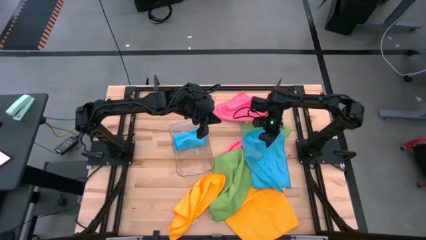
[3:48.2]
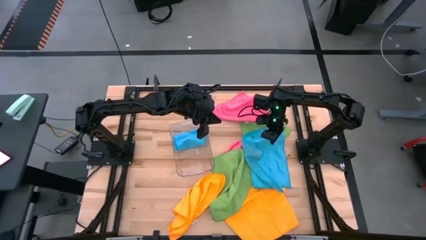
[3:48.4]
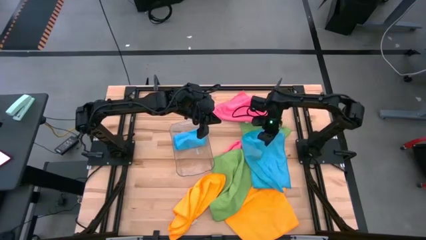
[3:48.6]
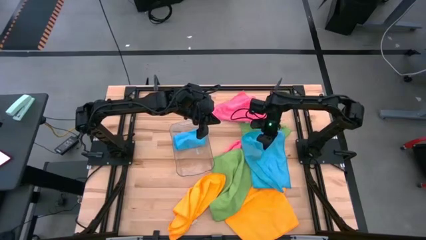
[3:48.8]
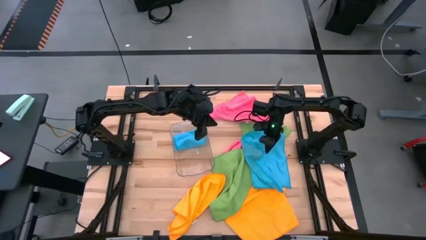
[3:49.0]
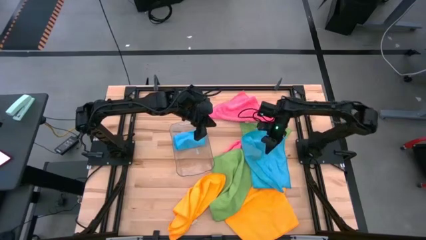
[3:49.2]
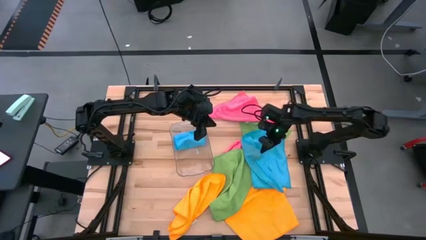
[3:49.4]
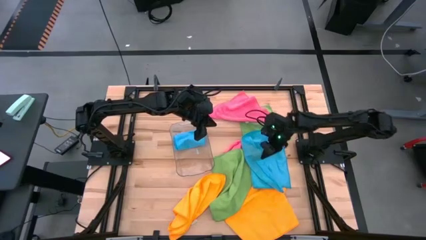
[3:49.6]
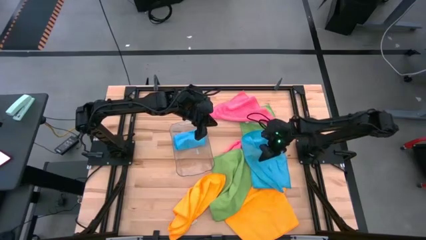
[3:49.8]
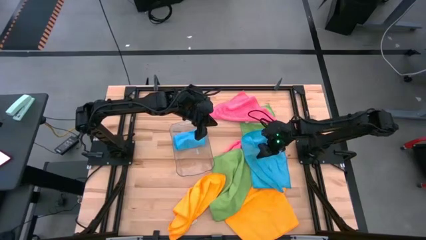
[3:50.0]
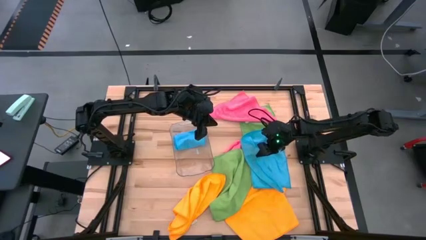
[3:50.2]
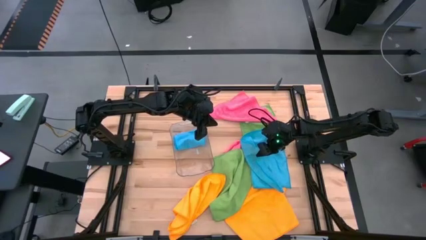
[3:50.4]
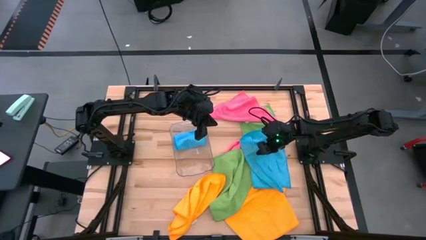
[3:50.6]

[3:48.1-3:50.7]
Task: Fold microfiber towels
Fold the blue towel

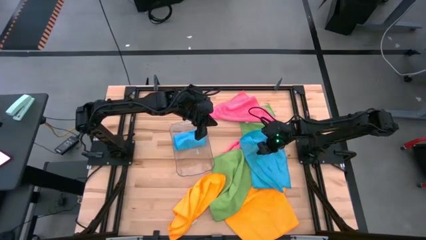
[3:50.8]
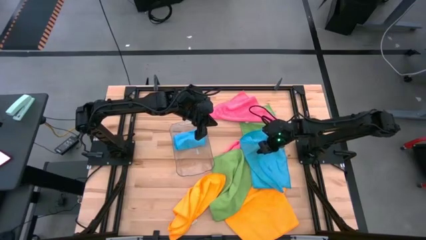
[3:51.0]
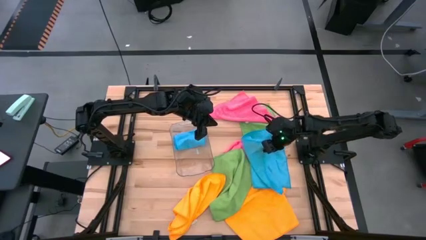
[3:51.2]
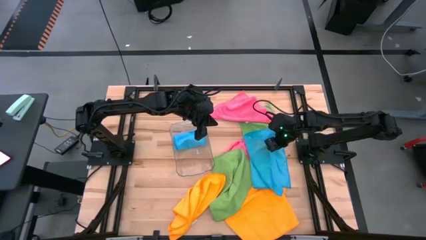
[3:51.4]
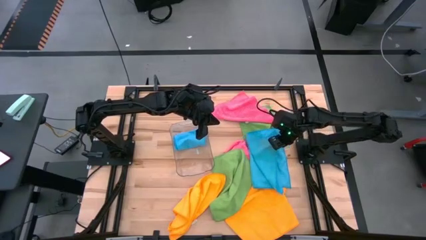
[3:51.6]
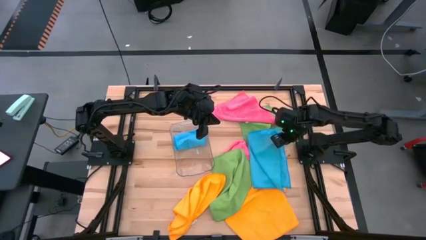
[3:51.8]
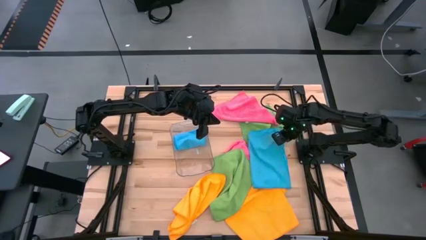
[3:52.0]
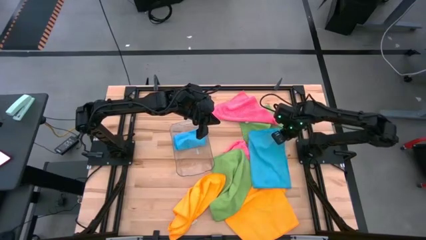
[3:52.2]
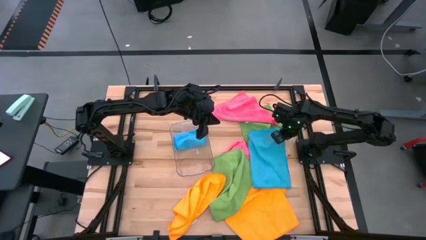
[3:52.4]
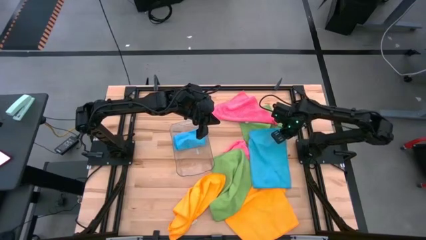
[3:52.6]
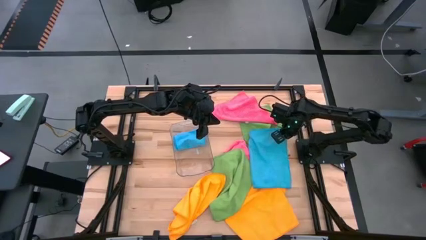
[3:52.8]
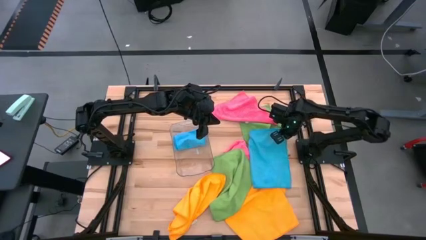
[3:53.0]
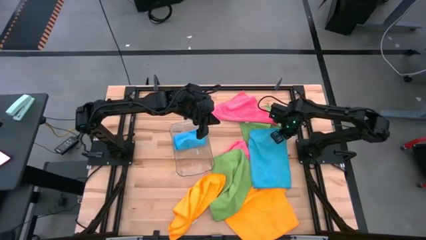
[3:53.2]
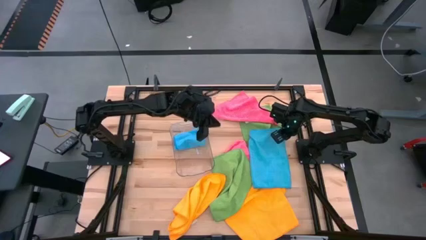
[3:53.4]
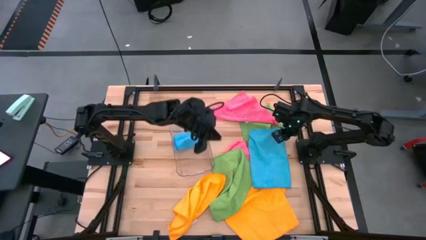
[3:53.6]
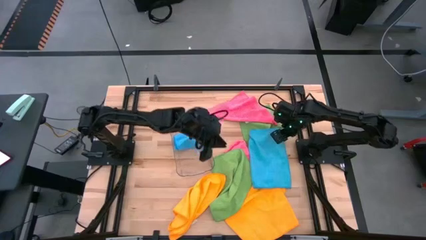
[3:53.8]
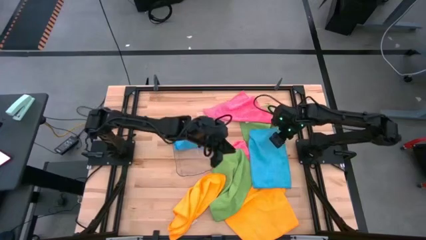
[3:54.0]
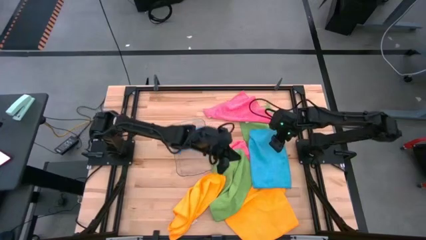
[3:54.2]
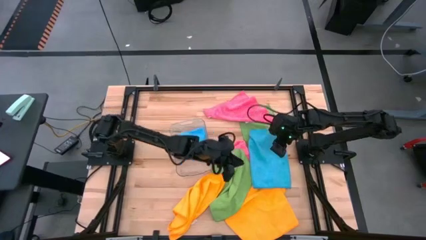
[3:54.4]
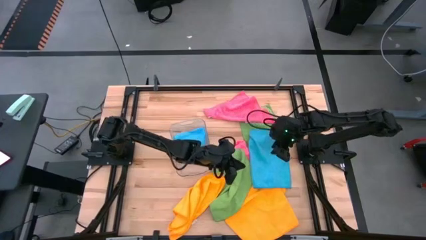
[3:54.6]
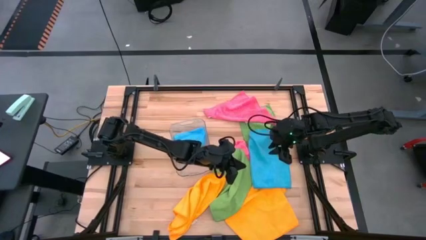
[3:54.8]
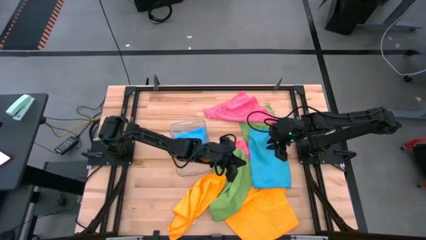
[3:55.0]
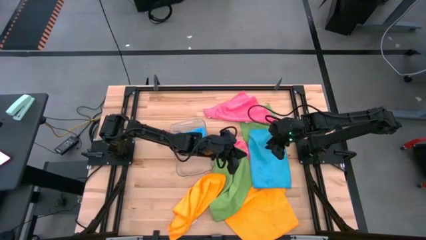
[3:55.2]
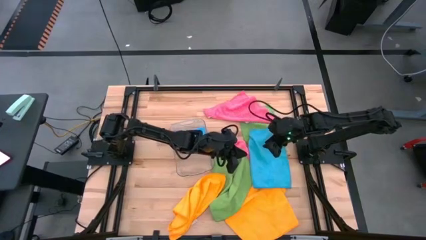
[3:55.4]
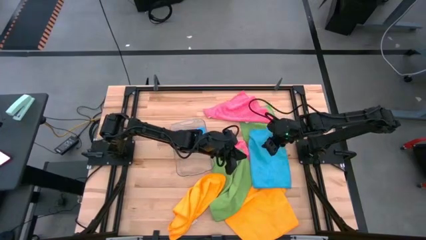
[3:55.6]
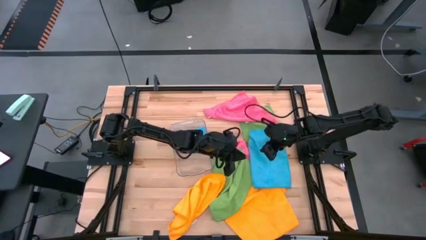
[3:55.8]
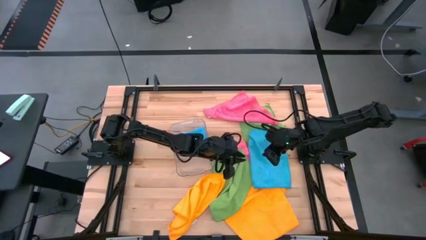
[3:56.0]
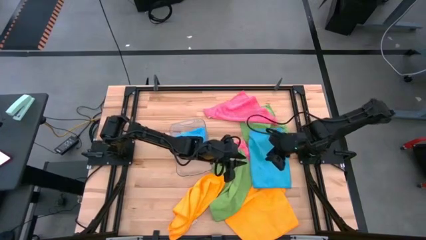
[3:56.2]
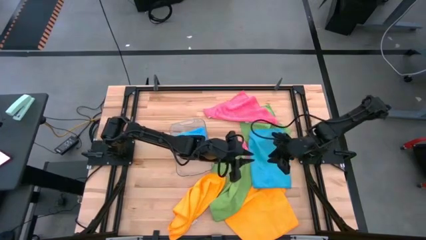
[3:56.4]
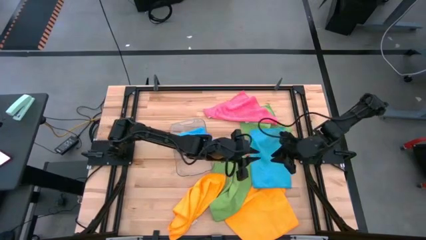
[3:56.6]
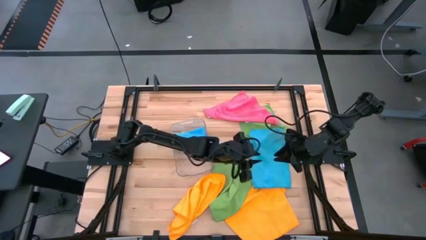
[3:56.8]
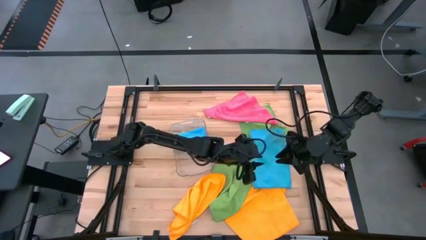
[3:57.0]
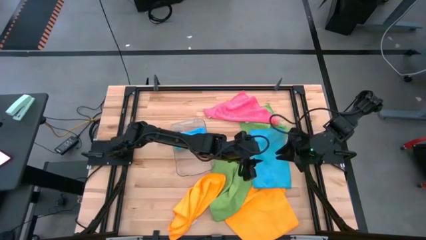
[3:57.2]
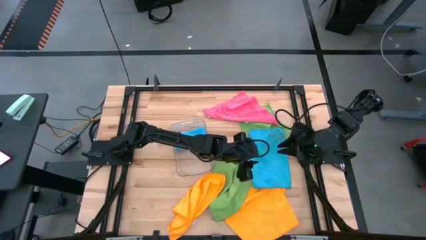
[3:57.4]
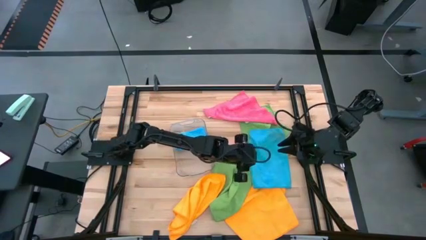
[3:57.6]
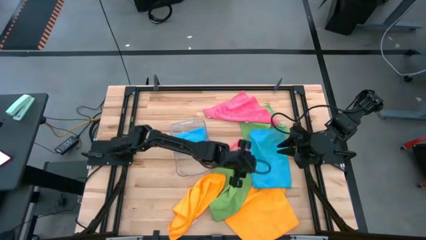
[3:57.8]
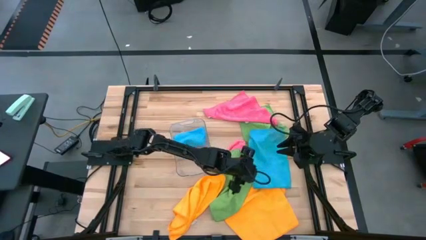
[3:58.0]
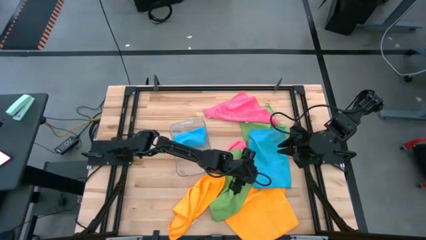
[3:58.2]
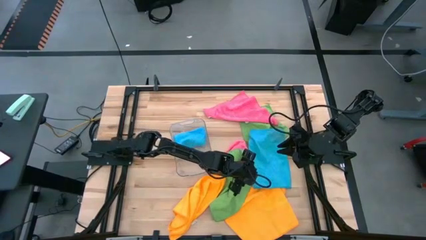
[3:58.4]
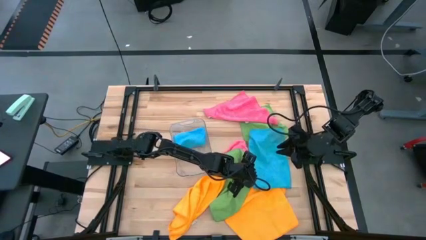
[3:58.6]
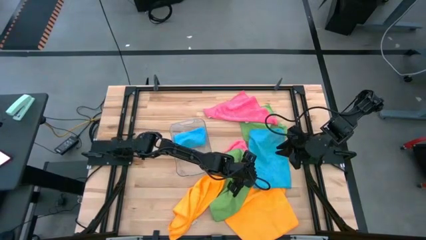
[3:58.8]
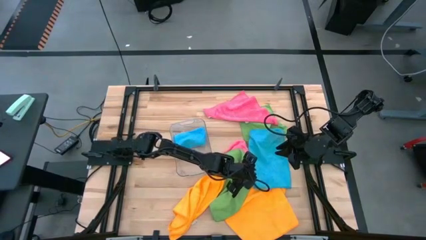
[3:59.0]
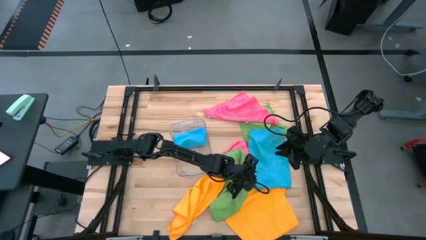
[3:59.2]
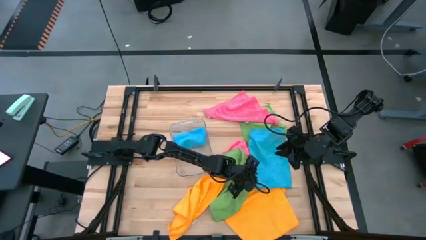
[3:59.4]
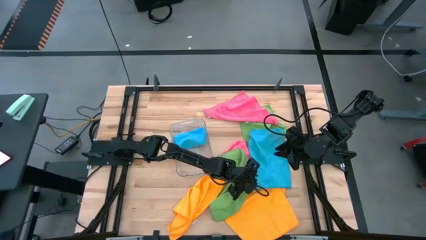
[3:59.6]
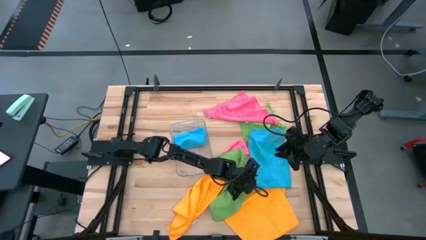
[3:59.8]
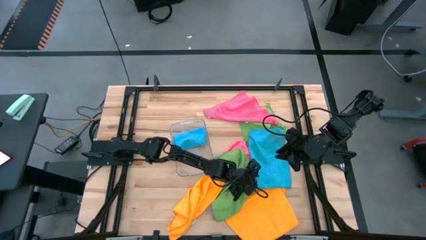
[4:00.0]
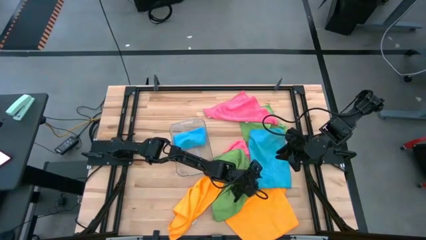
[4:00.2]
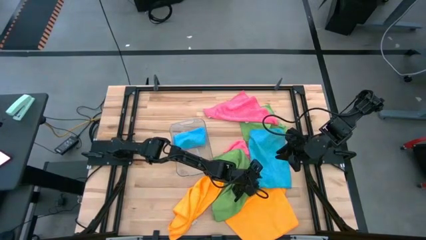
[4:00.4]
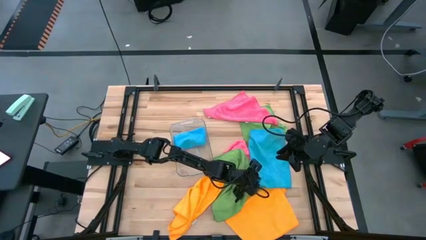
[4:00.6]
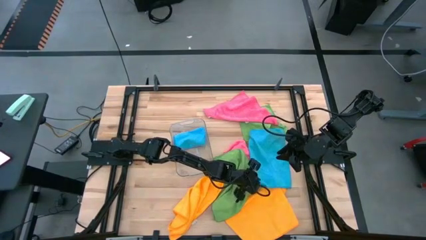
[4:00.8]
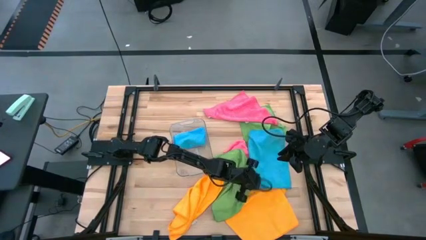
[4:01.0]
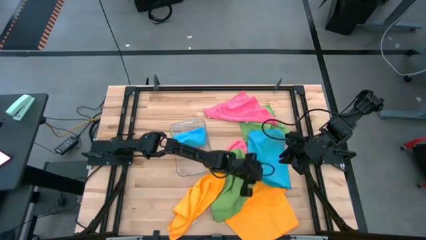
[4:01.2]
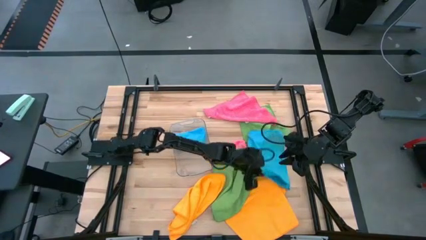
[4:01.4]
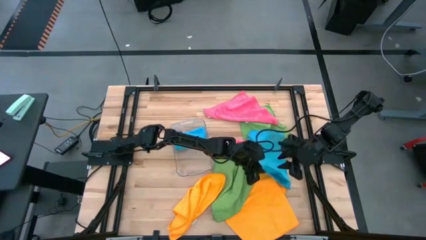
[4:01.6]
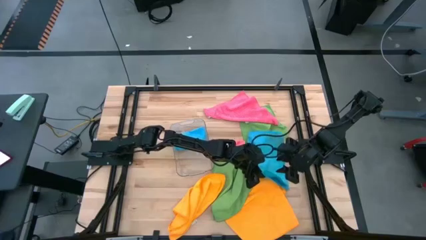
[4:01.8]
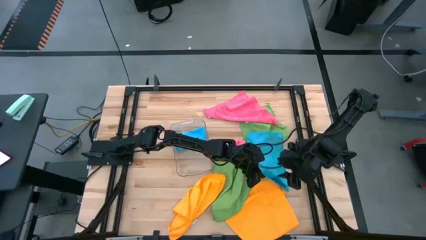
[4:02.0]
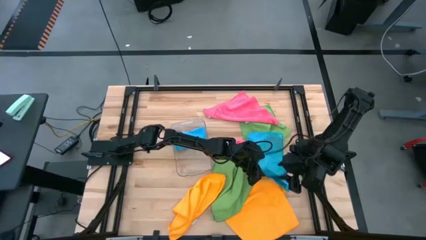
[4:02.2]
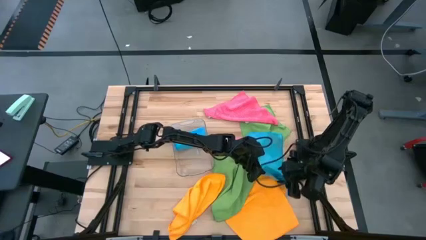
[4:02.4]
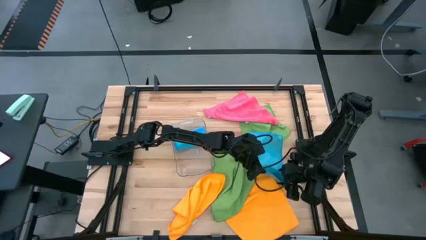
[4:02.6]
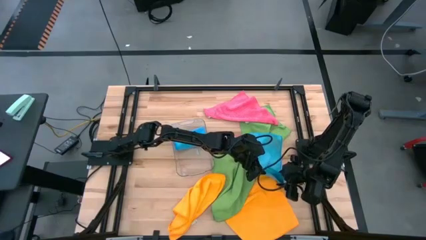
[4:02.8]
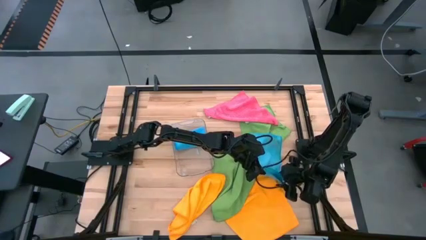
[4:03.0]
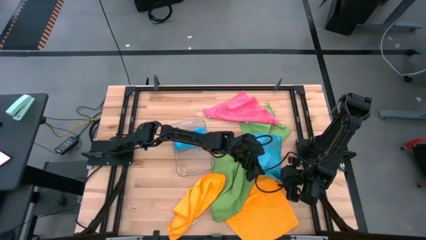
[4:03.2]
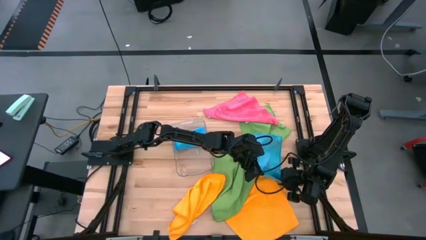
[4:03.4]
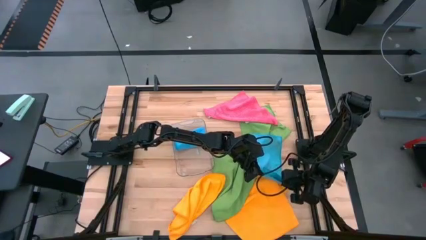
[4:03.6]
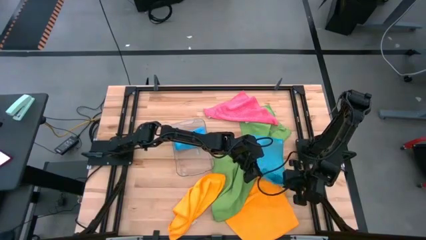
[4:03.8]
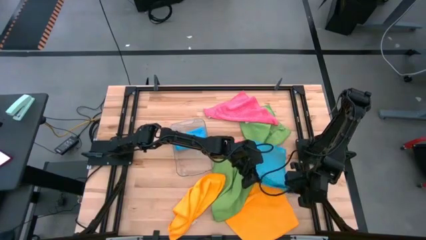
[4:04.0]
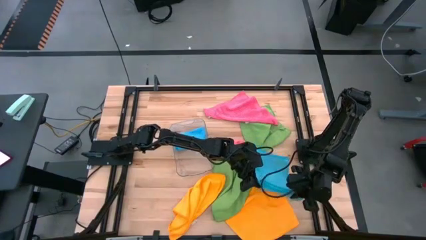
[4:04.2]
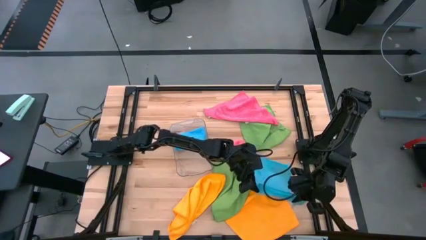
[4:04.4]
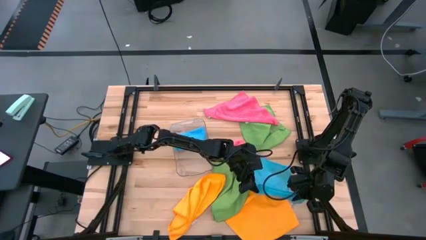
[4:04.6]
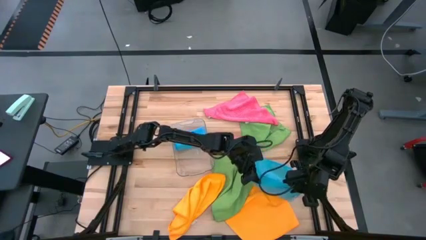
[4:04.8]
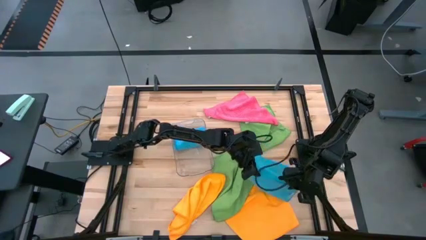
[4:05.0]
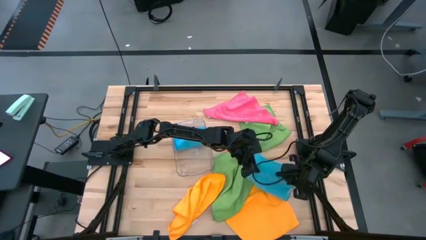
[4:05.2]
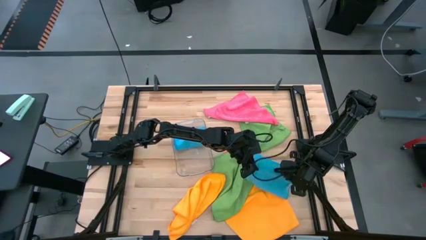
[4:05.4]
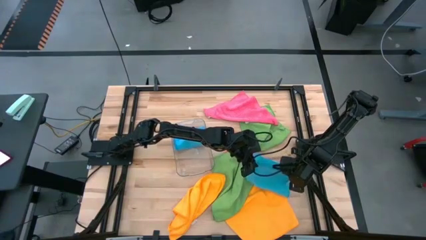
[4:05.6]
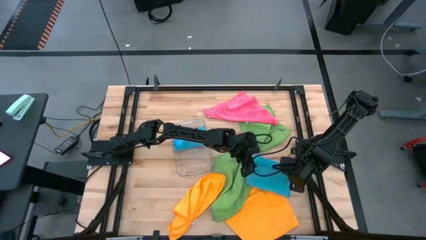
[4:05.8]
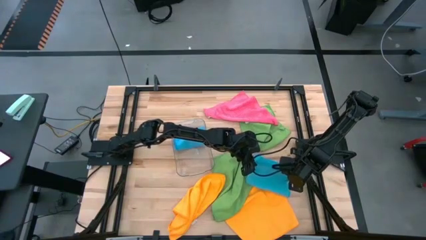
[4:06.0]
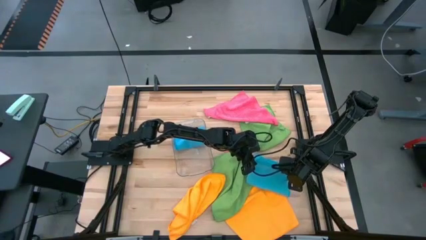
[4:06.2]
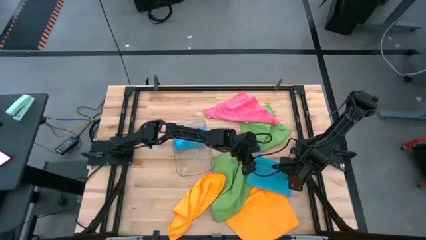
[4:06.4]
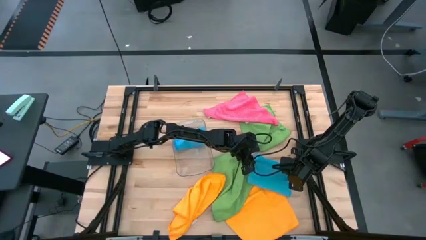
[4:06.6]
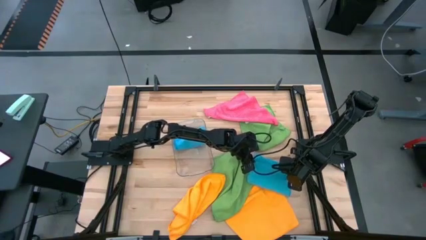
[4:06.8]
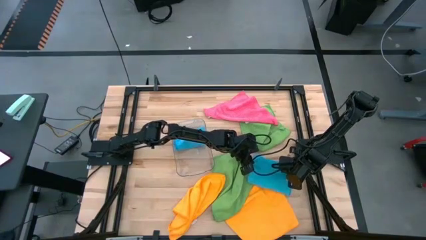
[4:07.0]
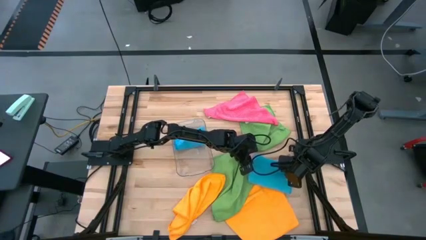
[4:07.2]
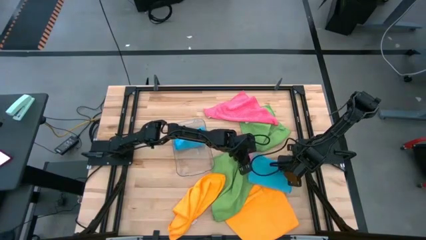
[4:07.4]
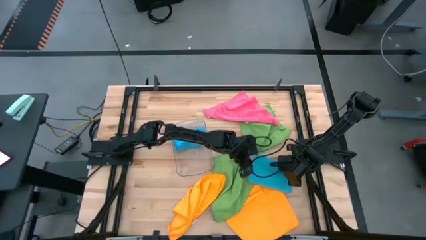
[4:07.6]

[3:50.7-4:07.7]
Fold the blue towel
